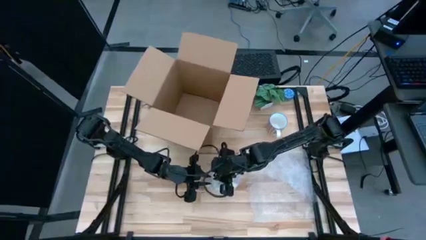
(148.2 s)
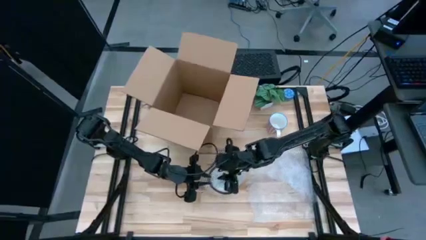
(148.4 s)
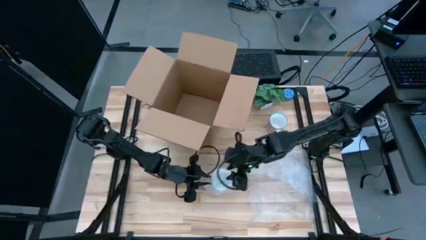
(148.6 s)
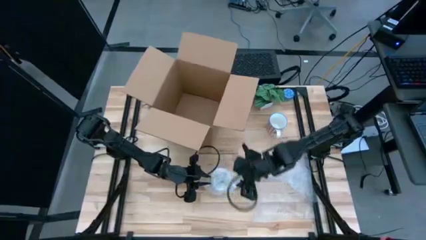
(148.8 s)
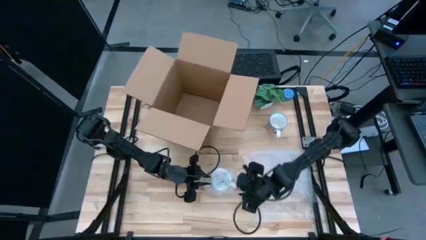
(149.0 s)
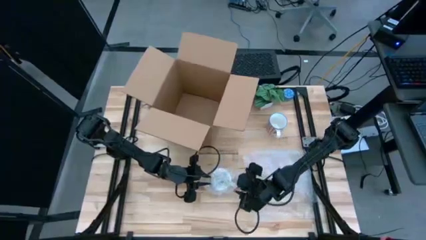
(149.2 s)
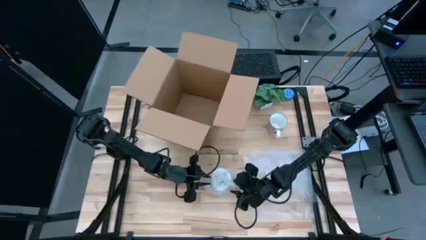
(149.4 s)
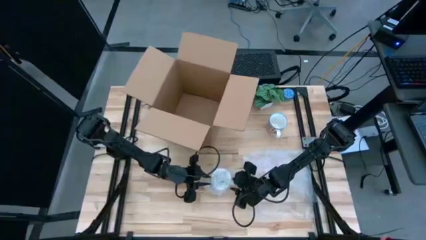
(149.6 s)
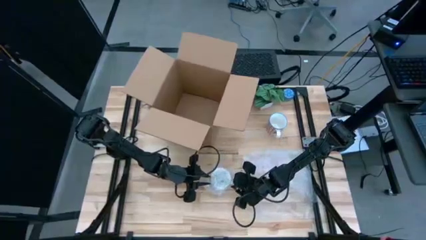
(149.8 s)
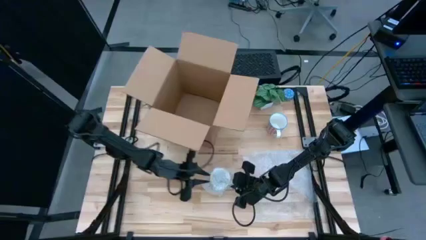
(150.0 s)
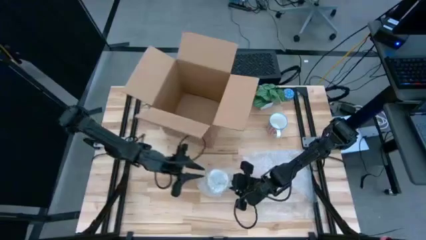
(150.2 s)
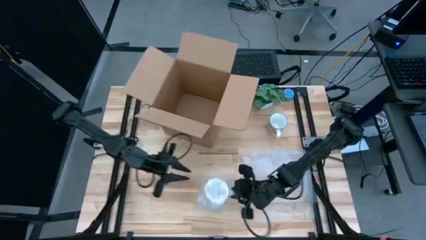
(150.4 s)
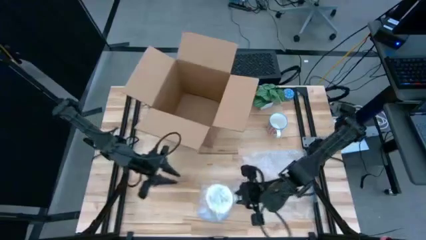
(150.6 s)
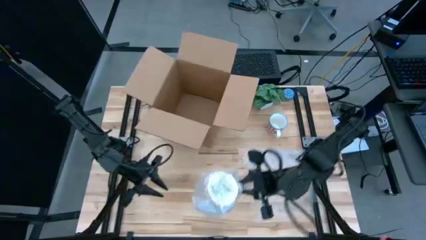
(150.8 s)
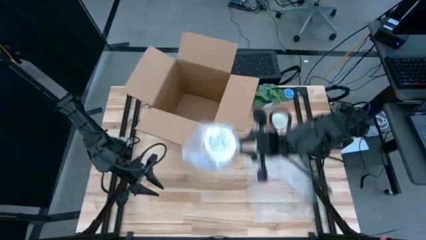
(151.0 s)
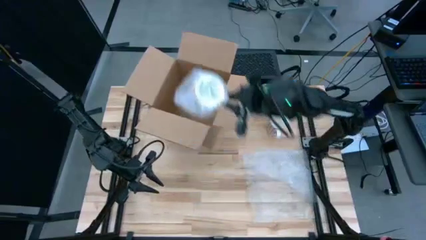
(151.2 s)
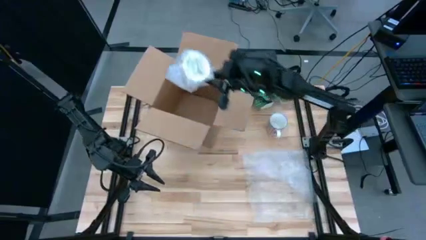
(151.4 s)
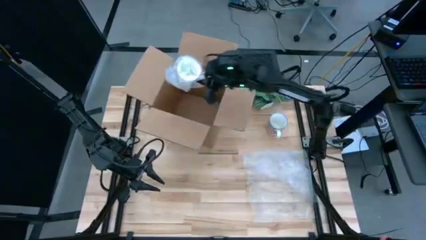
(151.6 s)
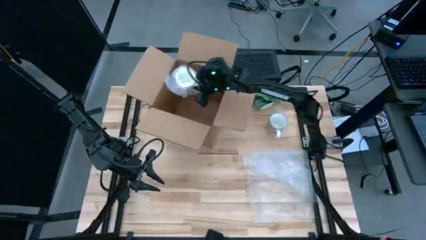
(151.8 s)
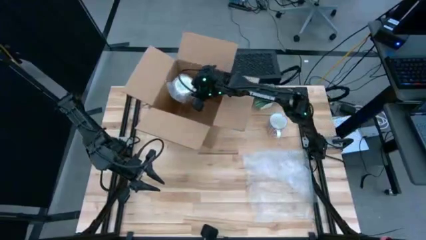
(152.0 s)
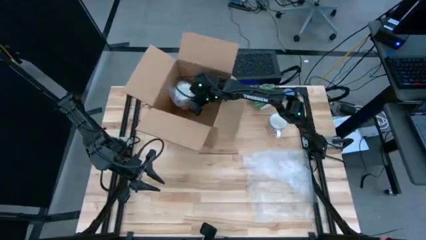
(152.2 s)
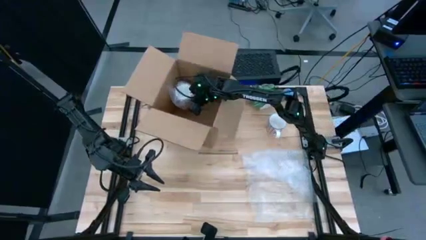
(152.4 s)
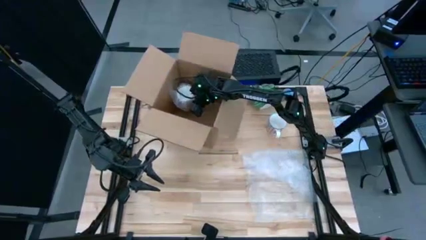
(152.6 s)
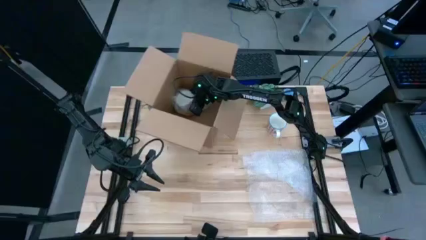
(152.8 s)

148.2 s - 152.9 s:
Task: wrap mug
Put the wrapped yellow mug into the cardboard box

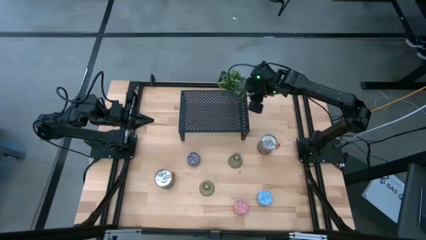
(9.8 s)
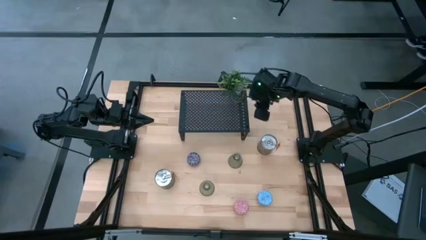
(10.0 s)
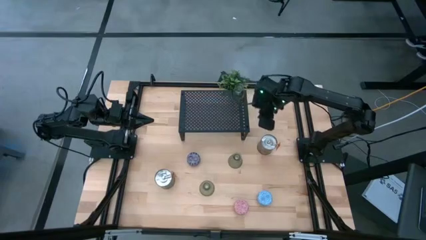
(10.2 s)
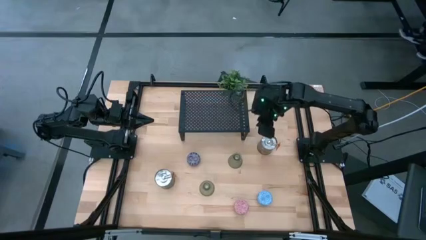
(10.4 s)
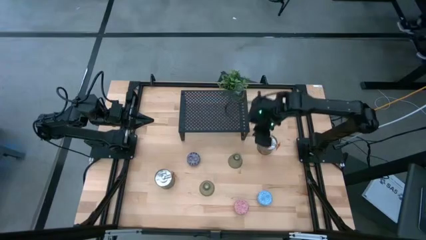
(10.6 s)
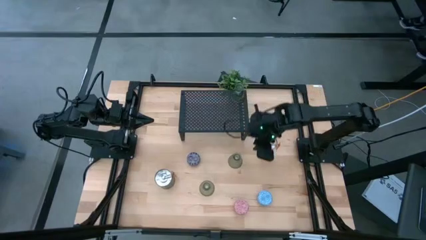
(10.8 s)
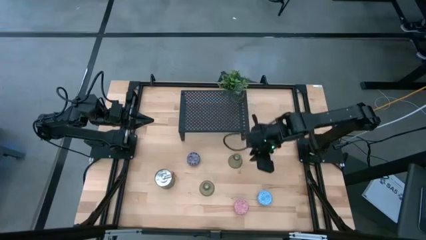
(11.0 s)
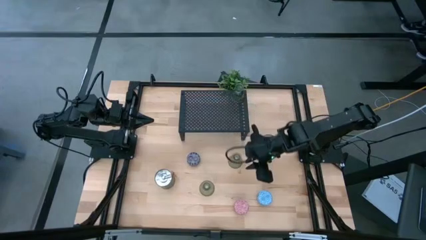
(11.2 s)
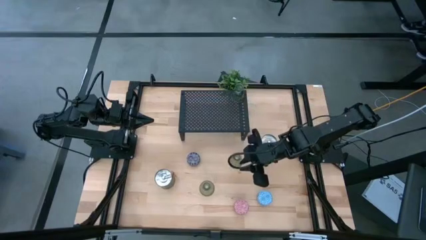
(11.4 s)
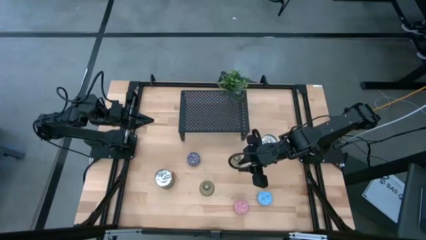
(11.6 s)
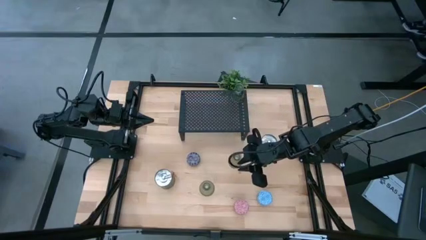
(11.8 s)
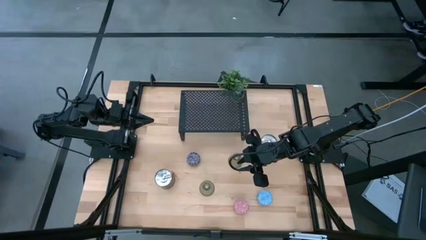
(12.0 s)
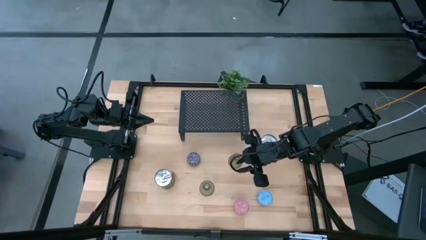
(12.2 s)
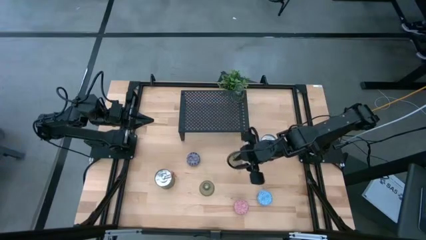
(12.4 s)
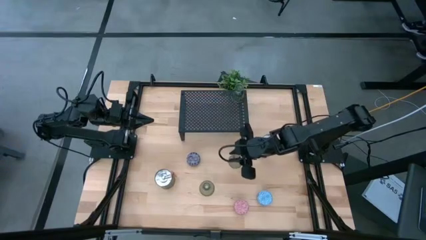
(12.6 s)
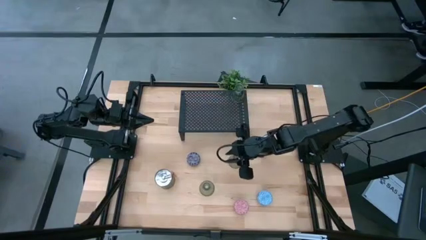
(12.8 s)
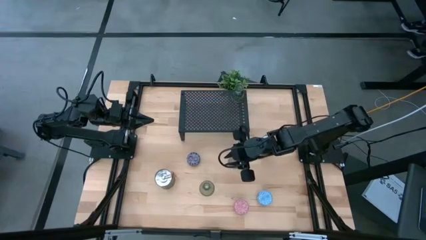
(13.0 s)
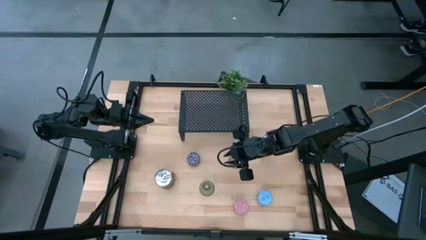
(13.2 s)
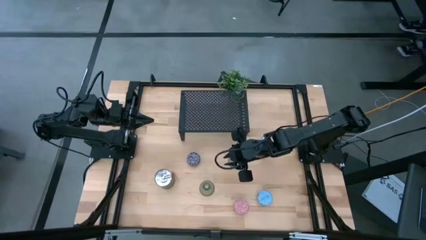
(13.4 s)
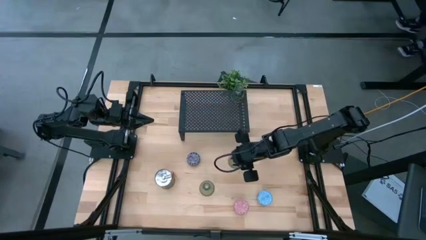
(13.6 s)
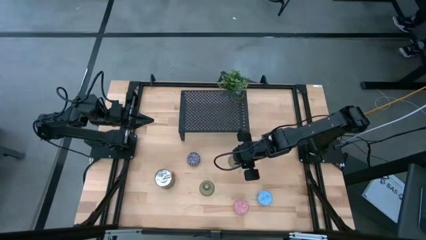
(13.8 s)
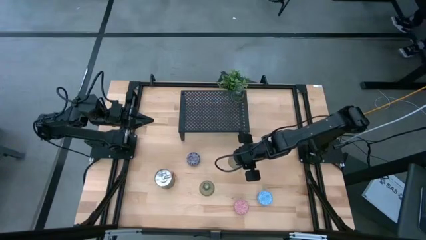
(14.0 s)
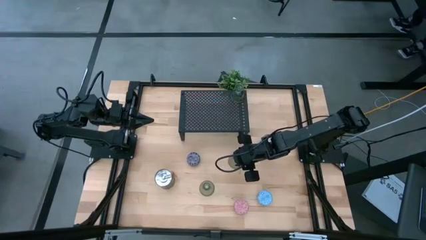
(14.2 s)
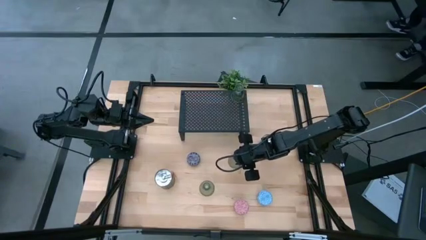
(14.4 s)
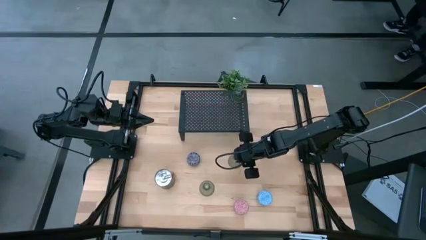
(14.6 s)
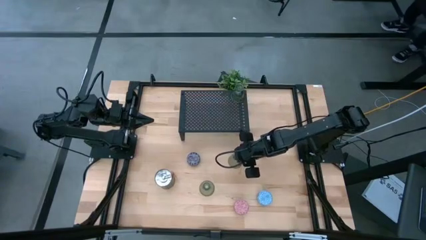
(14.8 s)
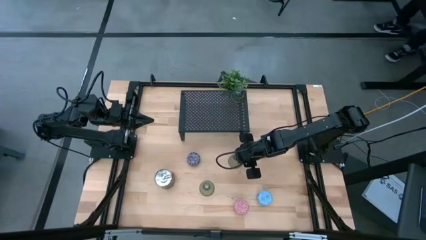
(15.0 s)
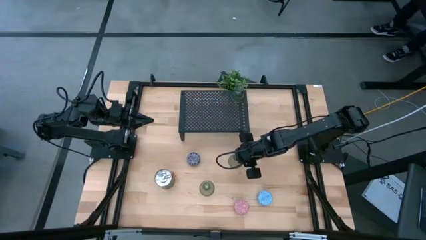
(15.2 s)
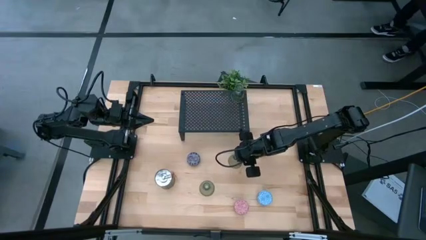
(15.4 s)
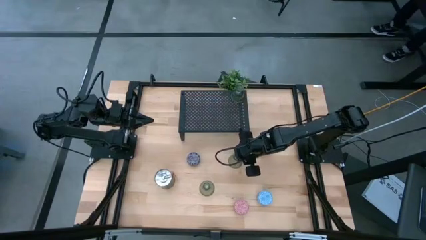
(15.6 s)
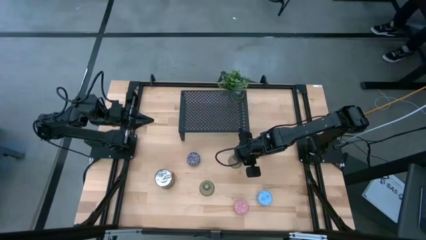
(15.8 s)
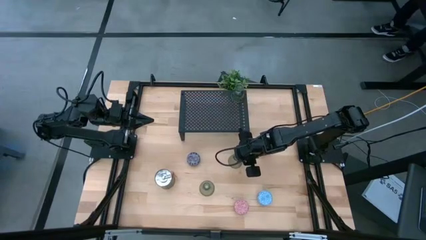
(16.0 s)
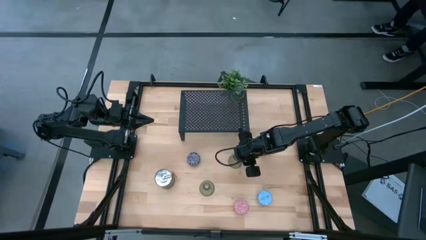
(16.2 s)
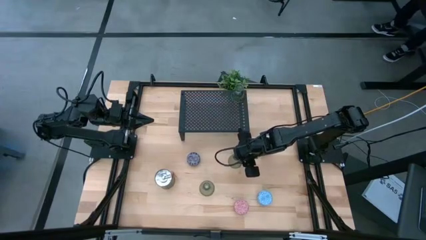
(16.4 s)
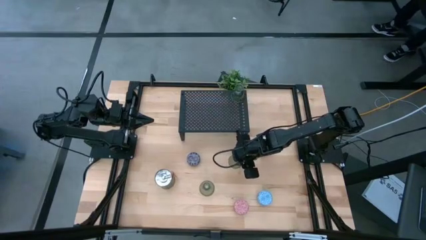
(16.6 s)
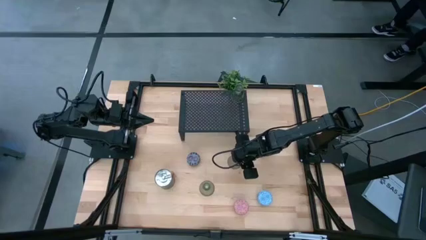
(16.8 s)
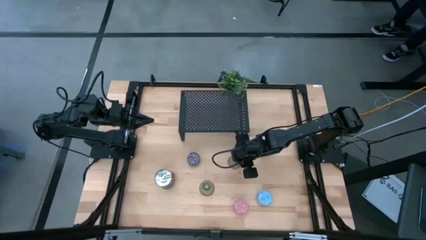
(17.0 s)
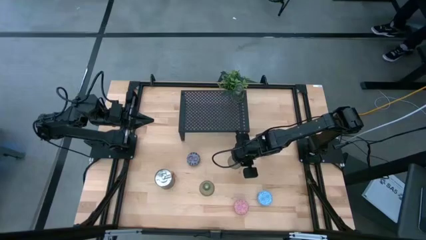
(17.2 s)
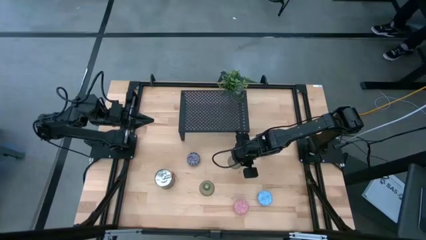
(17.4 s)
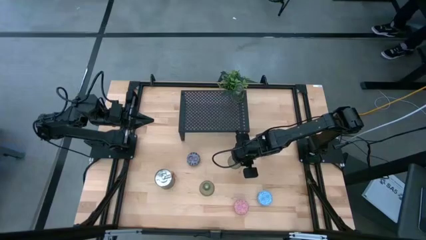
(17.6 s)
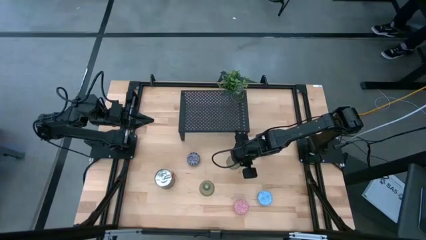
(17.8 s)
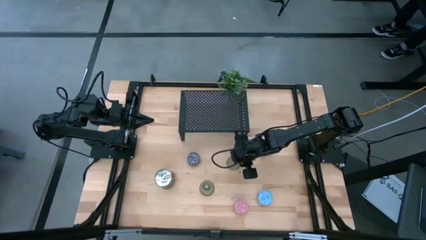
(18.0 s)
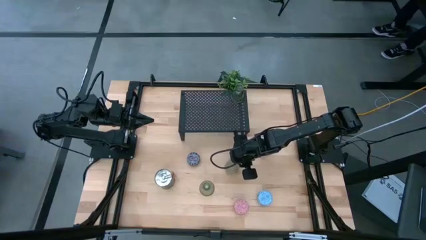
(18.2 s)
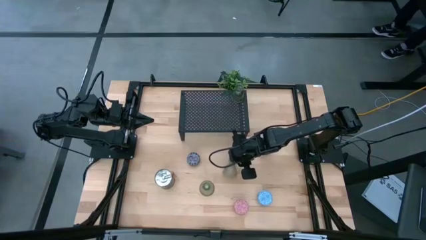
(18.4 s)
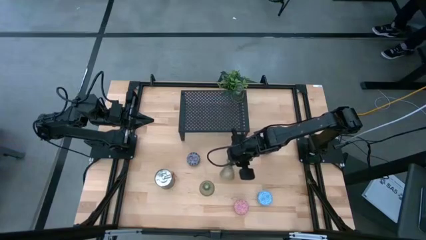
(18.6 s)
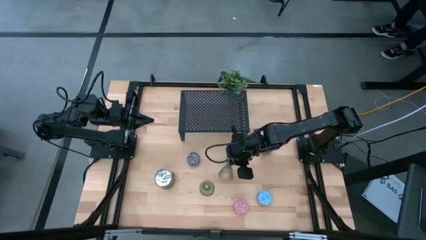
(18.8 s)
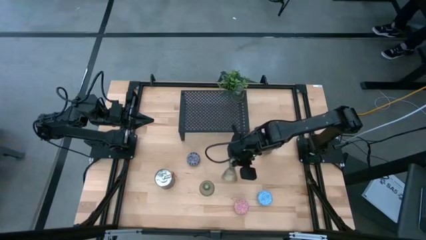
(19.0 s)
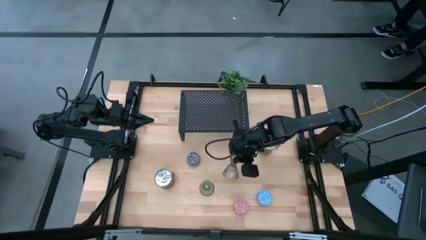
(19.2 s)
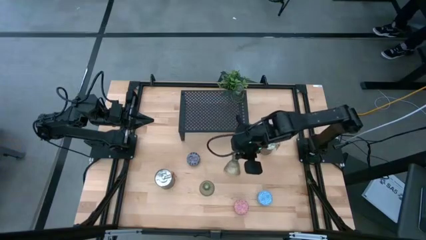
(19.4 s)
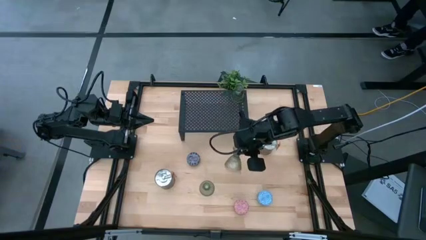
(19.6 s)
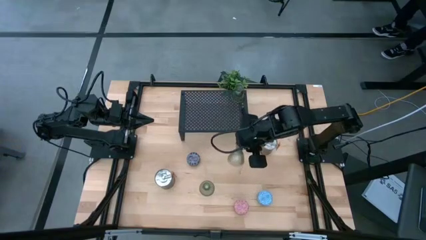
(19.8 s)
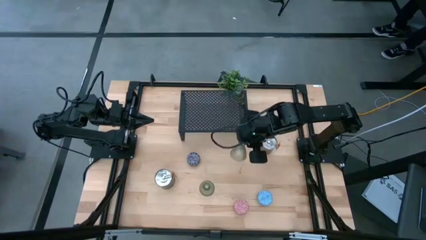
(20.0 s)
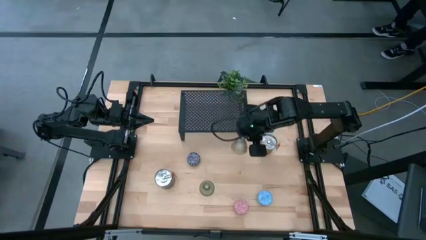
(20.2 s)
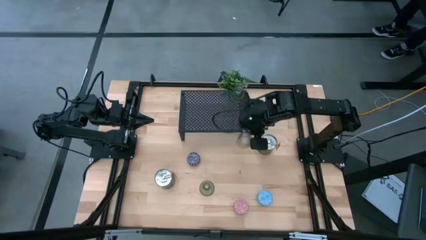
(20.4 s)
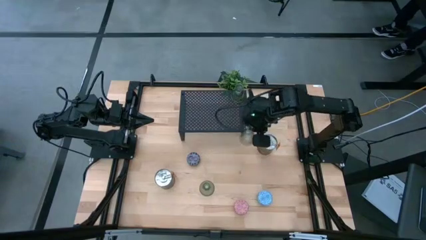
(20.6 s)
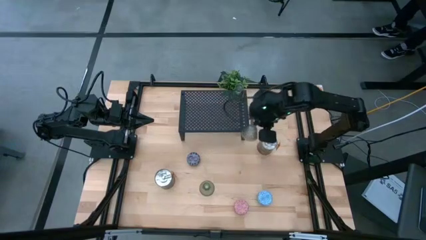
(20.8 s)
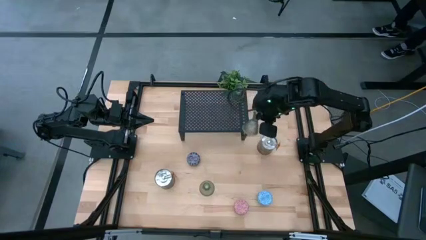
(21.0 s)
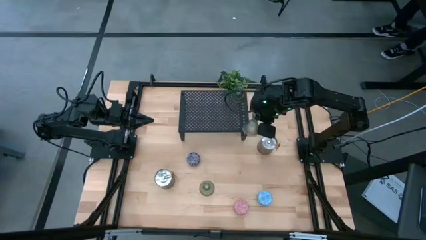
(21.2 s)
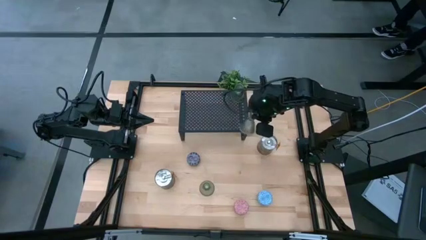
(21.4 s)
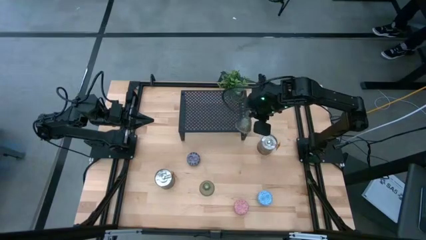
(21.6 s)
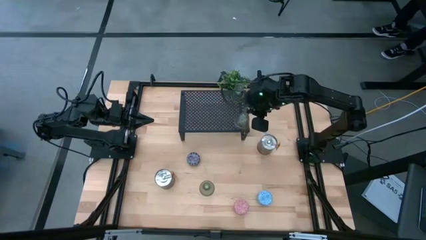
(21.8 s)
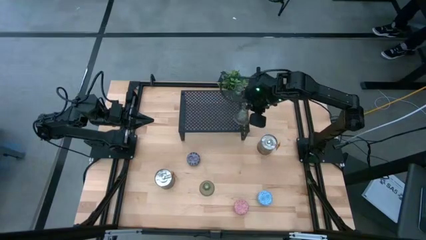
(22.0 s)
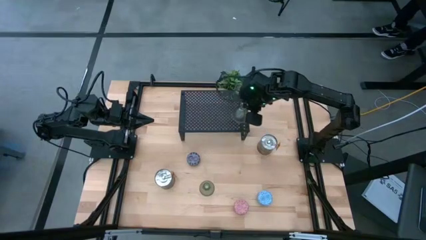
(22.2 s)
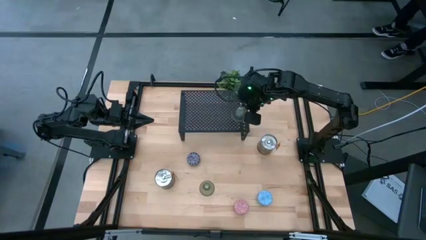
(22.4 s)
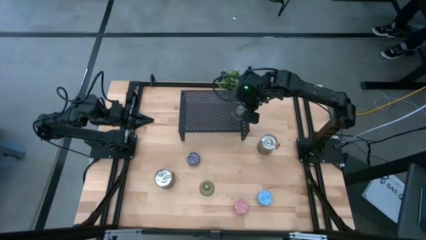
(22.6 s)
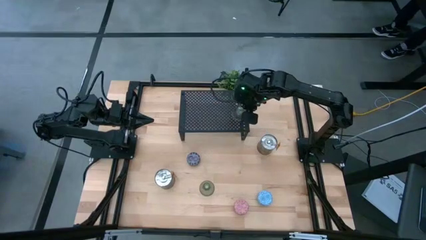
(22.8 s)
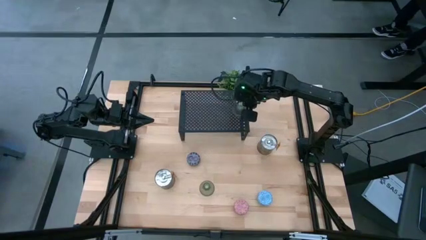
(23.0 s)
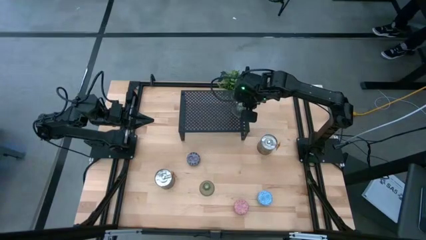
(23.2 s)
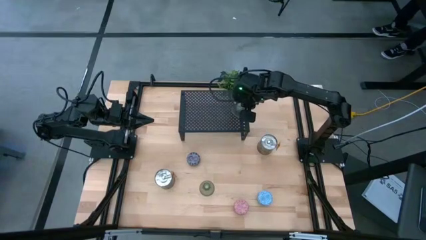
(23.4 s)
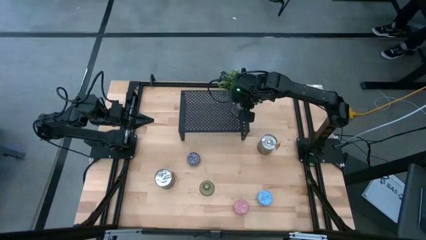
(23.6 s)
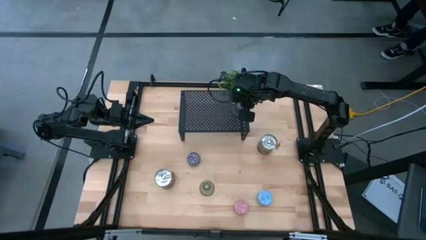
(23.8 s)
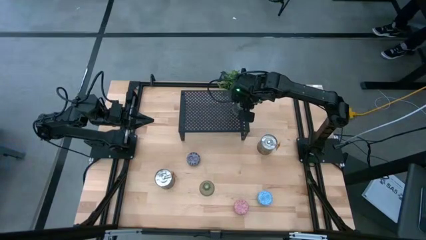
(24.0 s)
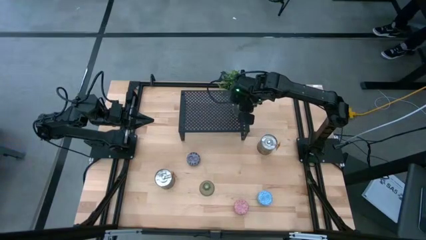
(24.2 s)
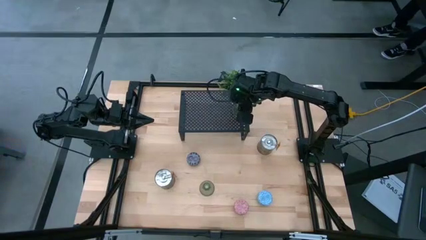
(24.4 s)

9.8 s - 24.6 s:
Task: Pick & Place candle stick holders
Put the top transparent green glass candle holder aligned with the other transparent glass candle holder on the shelf
